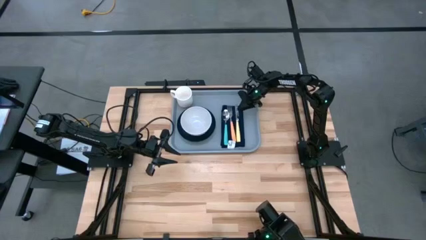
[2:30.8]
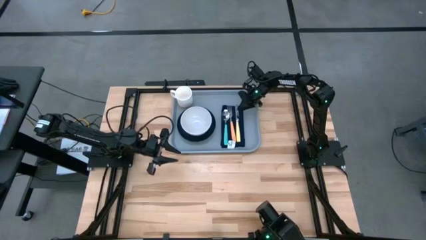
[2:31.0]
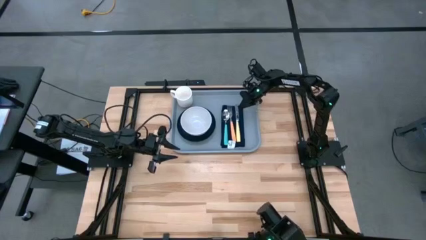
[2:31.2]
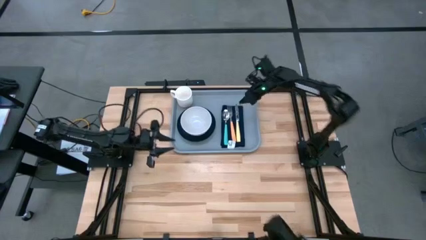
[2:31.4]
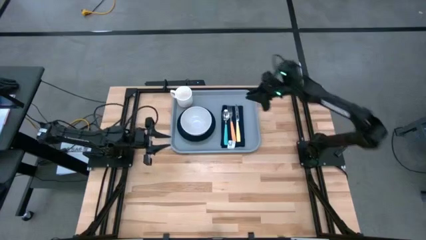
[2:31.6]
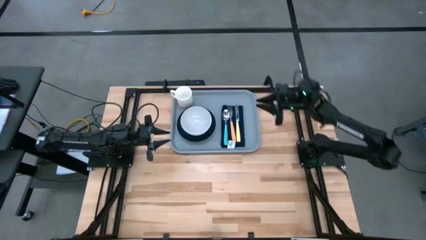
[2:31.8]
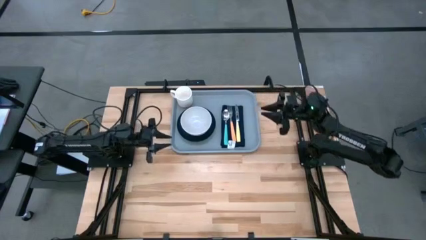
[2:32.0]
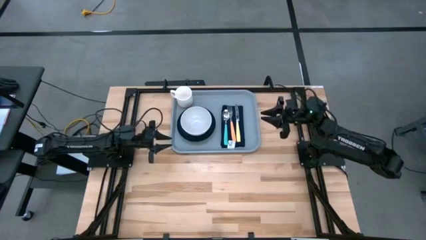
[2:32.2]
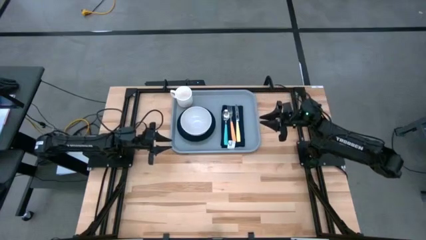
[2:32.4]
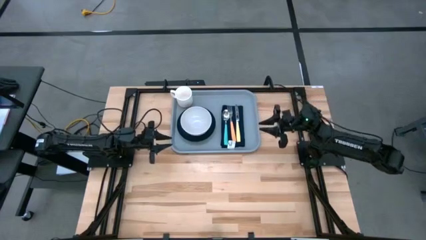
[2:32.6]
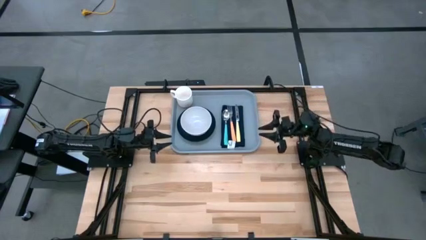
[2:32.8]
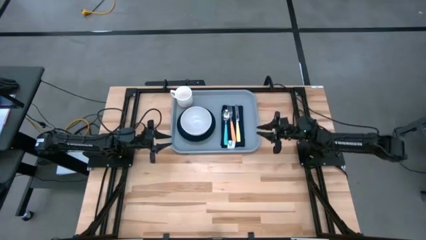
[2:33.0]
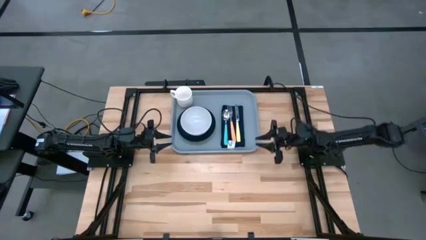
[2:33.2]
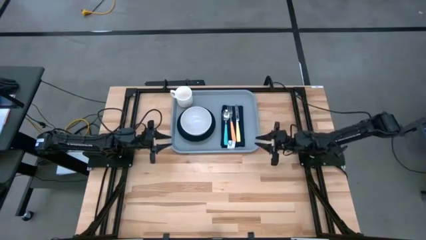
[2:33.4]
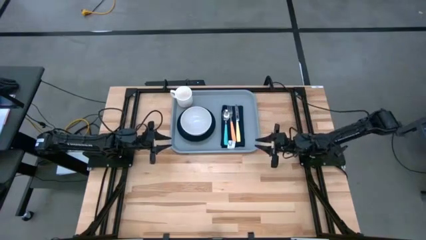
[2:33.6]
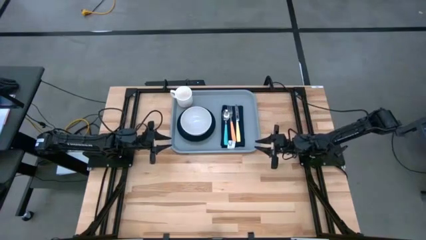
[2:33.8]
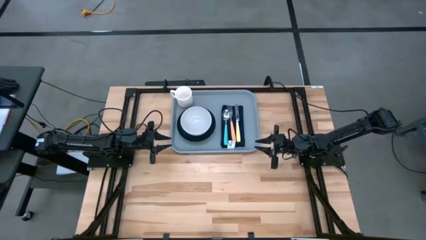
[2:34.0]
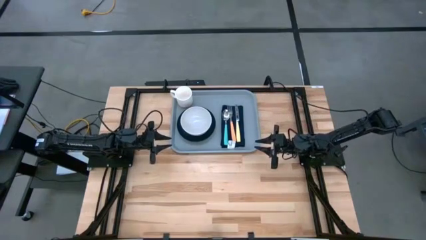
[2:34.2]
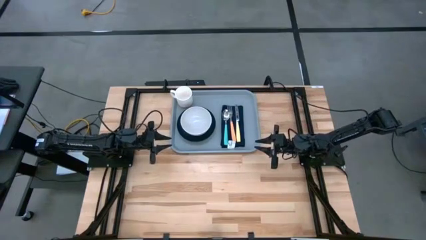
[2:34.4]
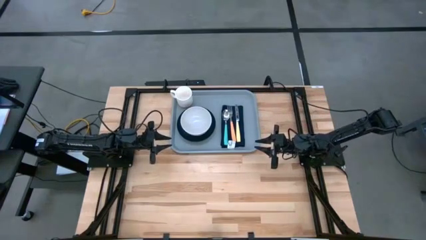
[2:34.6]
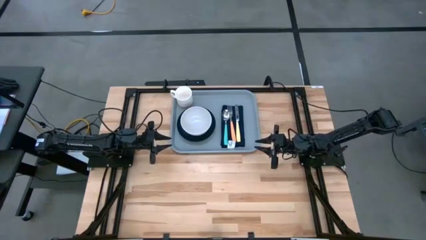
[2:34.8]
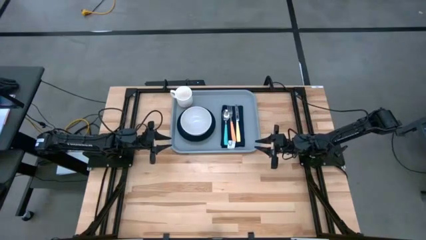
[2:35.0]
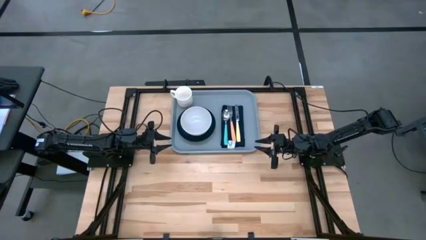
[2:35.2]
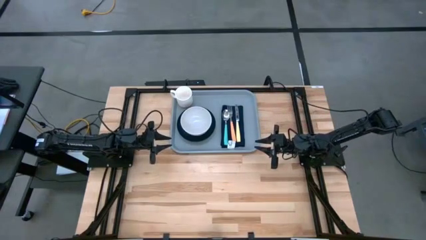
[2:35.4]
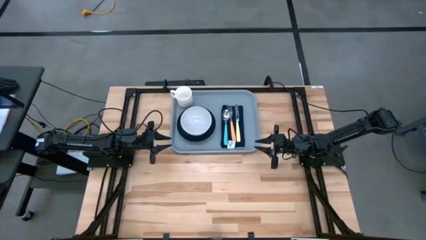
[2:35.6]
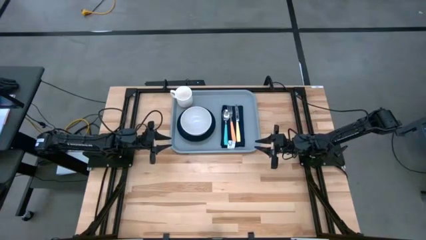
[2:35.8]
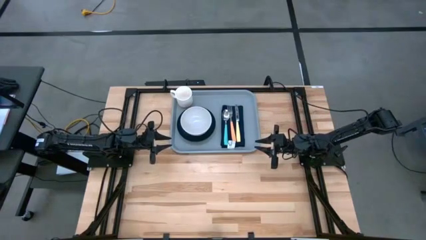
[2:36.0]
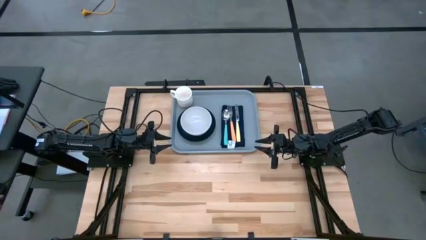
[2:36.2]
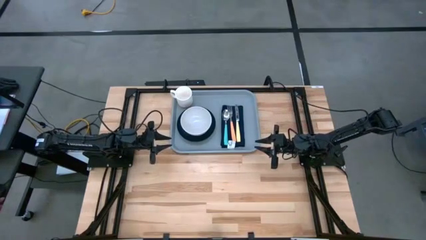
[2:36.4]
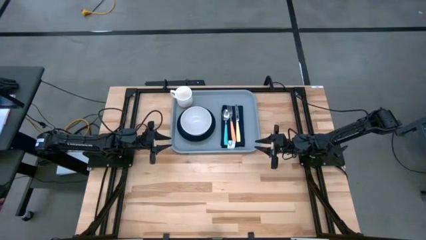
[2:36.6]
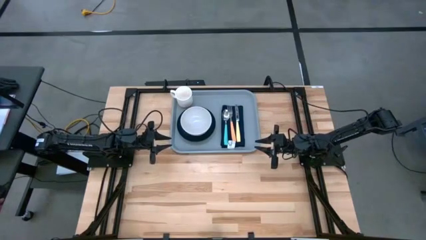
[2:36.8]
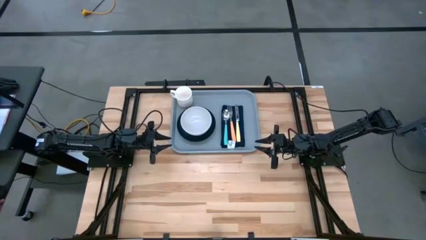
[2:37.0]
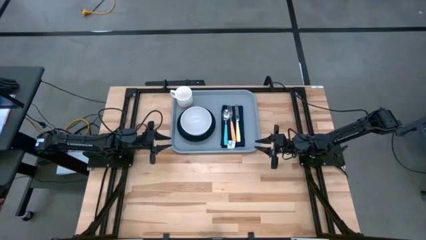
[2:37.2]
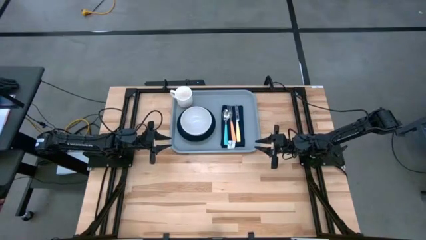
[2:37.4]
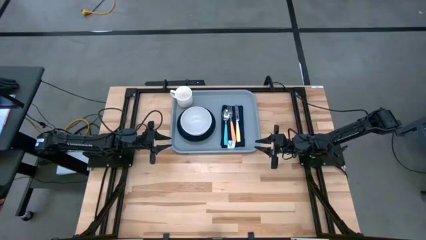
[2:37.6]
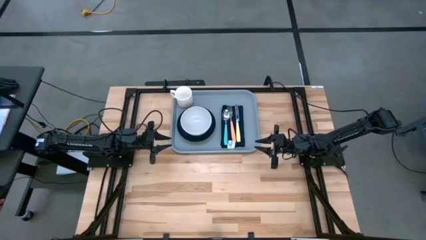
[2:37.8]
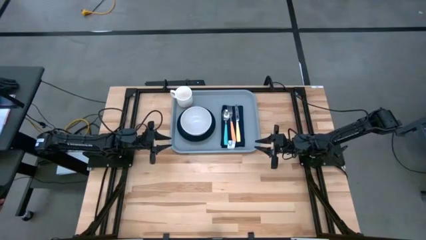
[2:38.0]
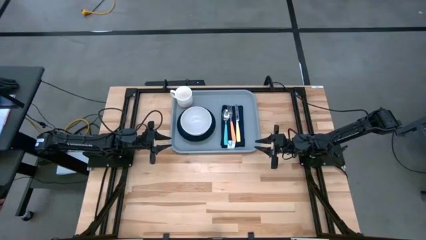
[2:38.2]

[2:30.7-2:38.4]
Task: Set up tray
Return to home position

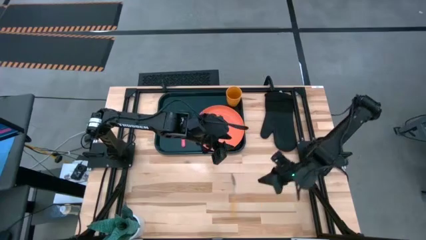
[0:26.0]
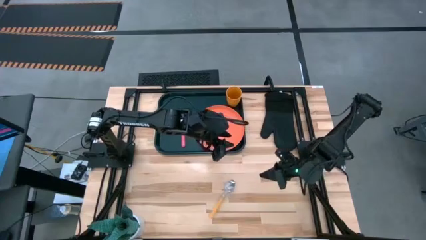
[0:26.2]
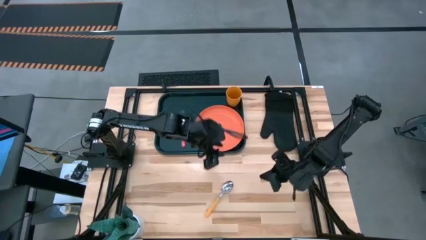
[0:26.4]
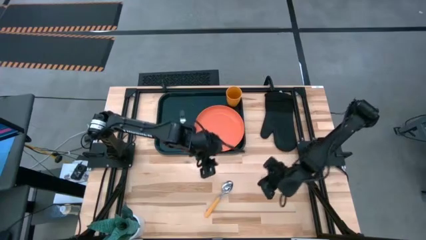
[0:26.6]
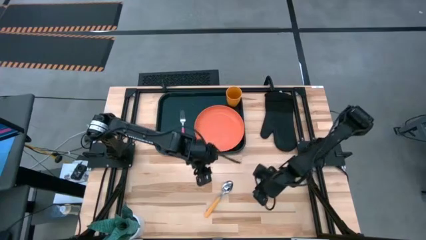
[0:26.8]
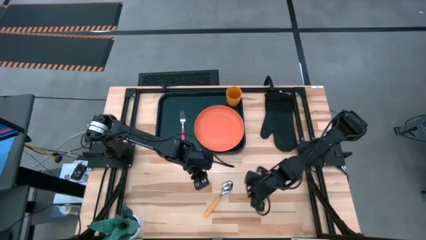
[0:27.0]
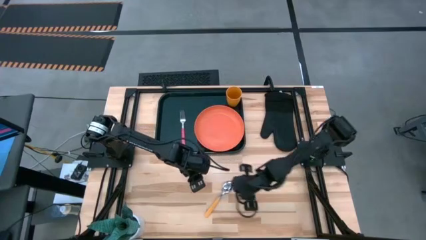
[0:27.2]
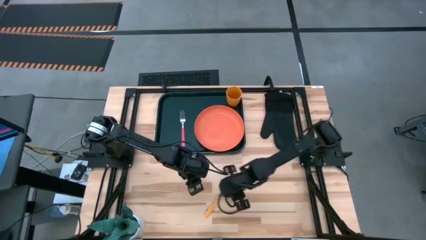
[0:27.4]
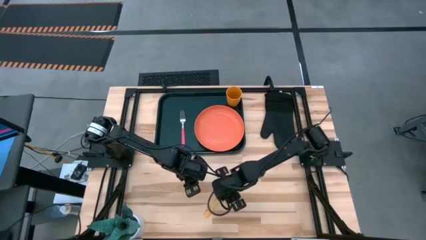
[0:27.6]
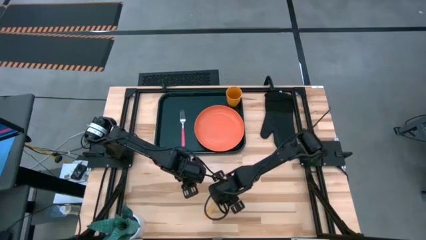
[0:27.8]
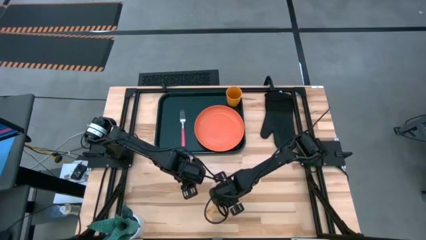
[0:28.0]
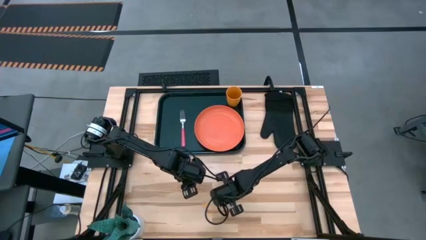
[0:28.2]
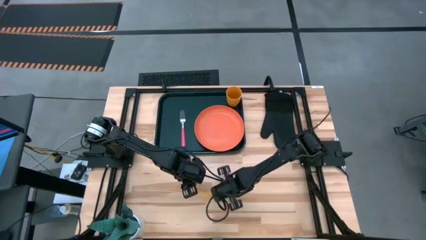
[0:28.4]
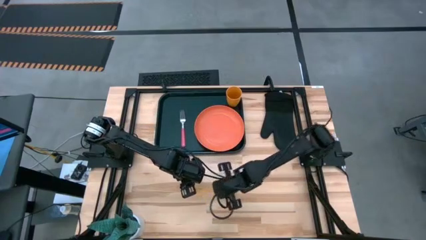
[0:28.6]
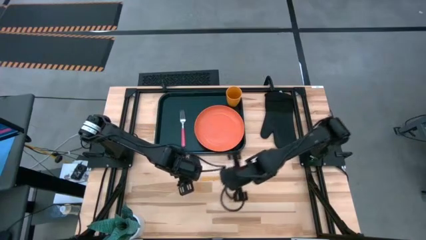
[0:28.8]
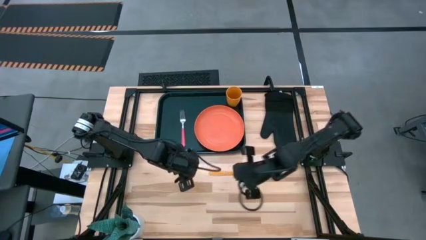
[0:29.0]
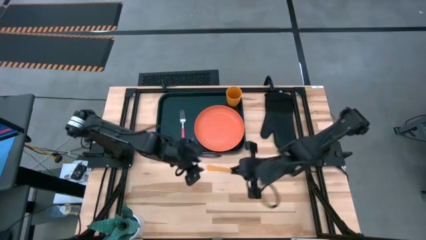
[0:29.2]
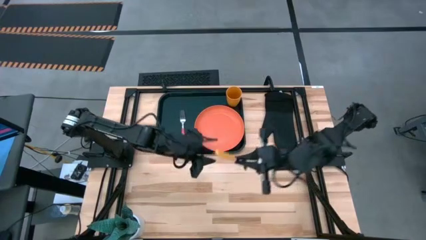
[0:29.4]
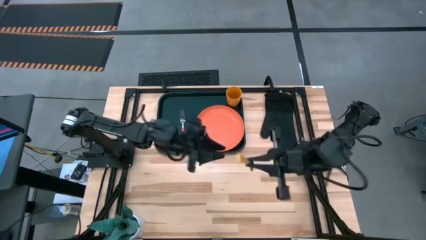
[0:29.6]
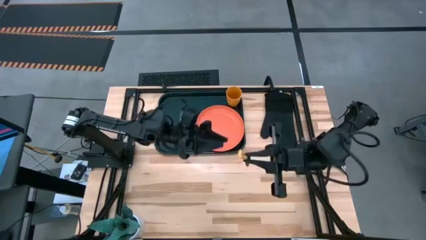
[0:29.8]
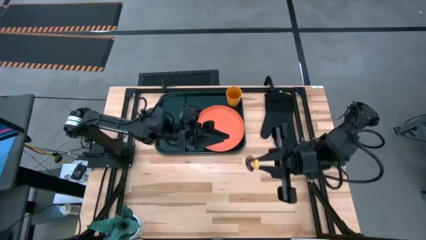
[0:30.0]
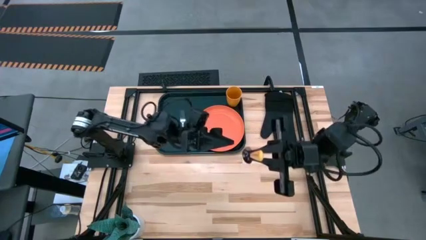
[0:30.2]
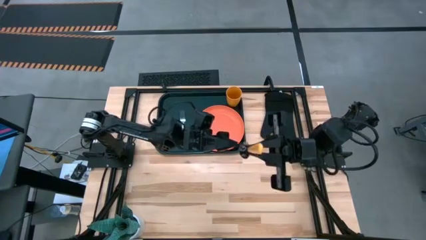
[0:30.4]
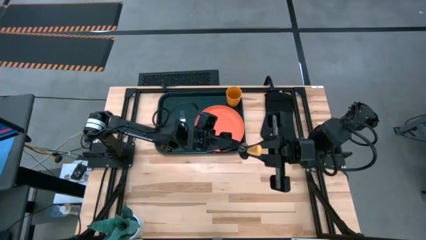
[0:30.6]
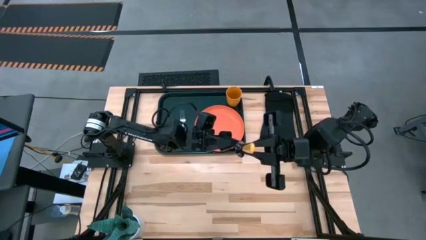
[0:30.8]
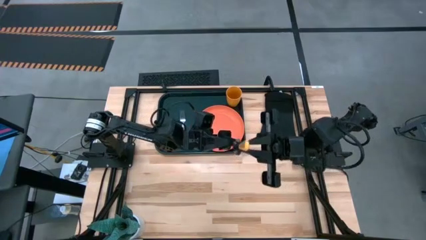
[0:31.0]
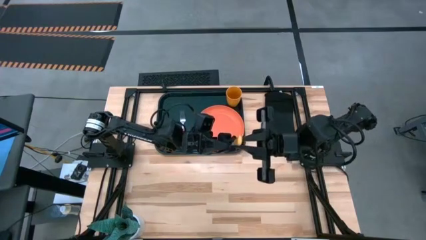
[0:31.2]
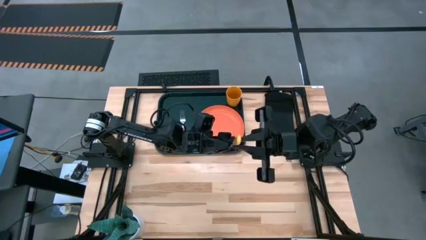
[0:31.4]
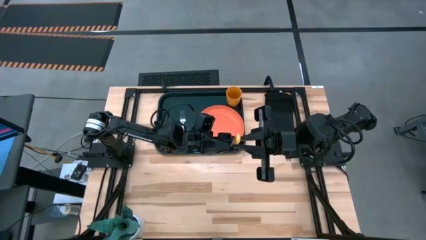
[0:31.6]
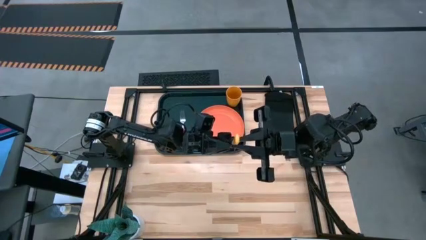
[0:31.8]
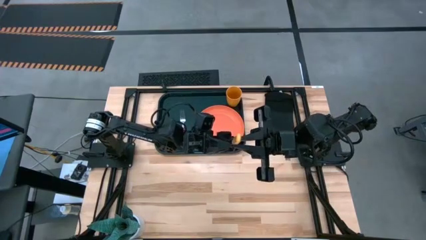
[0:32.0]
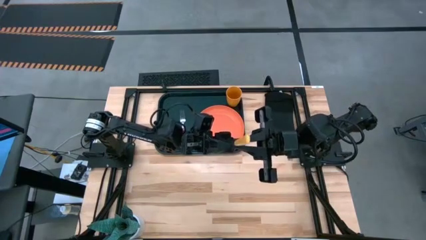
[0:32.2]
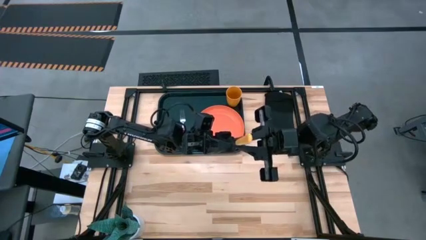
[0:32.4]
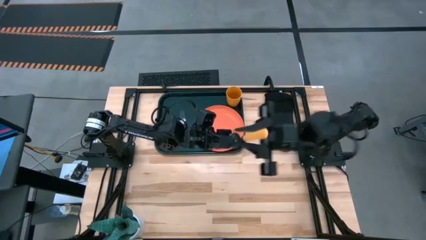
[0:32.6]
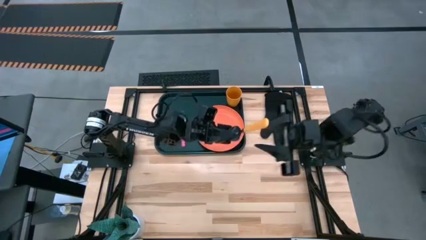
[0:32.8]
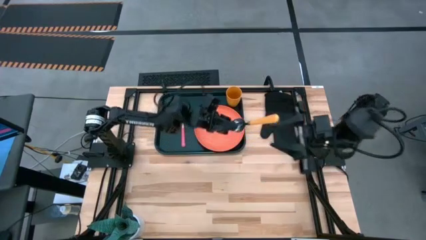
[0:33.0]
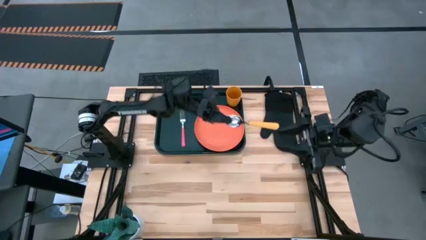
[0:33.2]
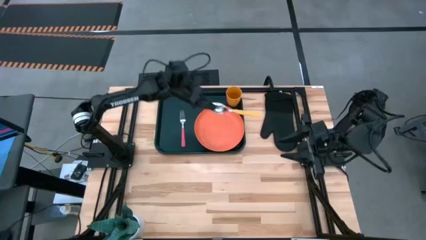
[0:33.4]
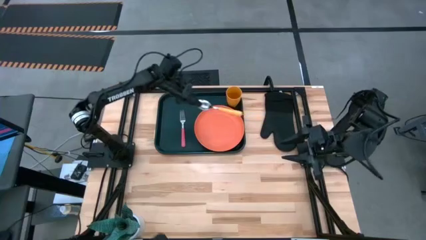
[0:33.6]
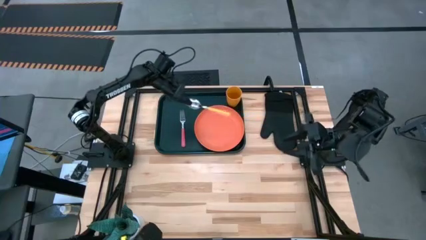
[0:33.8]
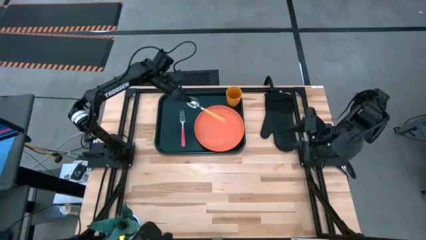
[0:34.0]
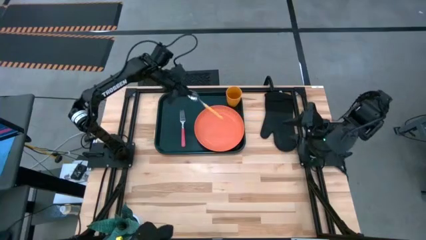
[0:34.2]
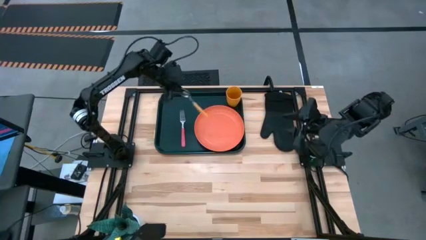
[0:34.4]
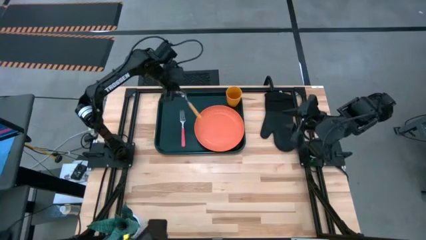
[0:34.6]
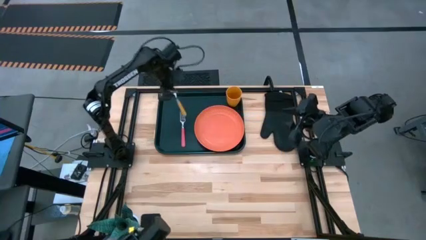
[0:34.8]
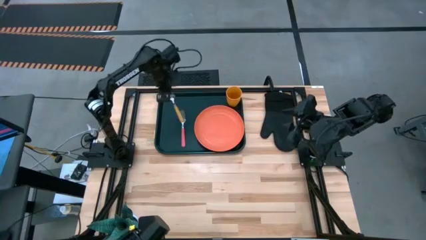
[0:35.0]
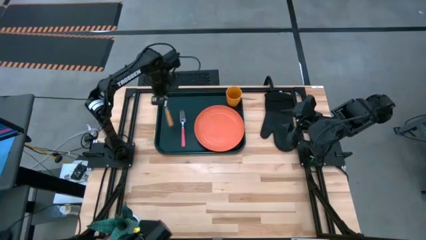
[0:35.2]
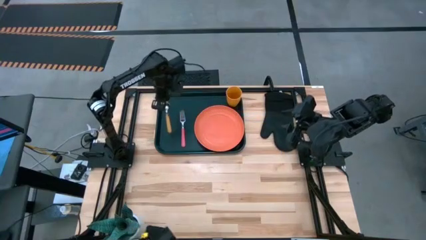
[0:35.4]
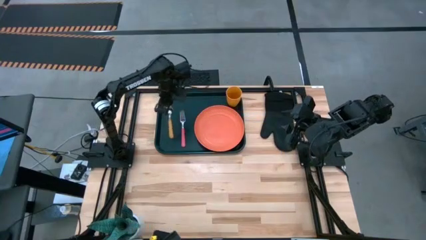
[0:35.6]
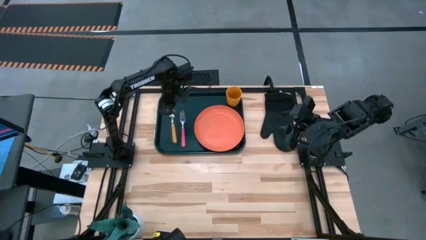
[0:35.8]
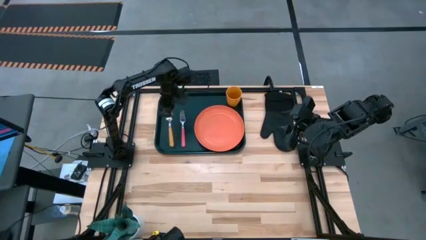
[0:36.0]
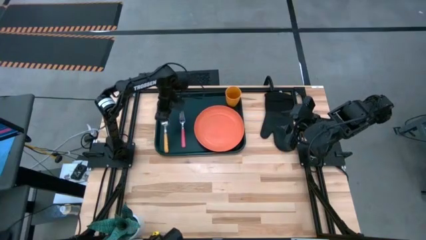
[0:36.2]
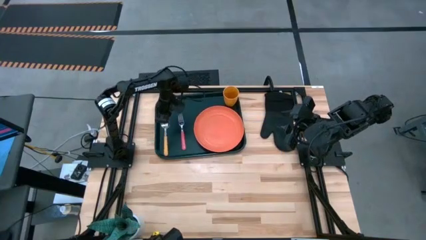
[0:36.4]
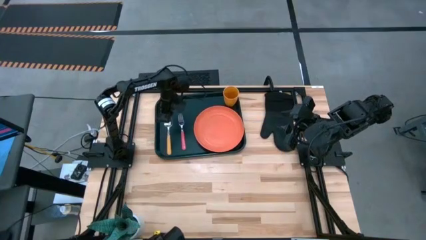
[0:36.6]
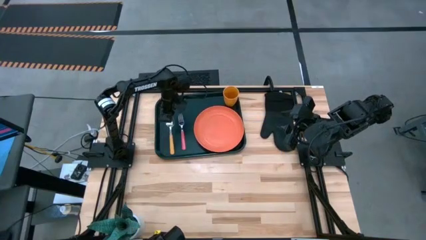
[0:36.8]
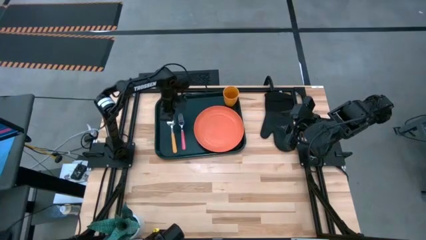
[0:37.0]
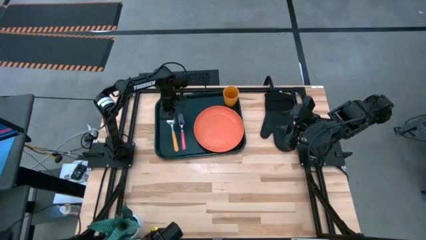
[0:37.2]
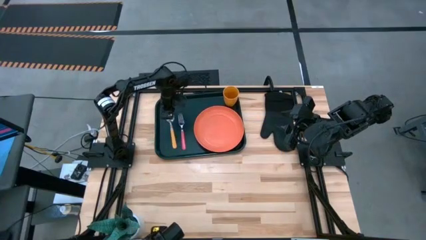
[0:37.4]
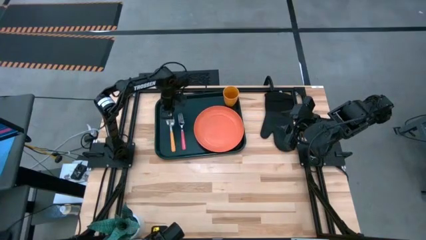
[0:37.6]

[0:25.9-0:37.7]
Task: Pick and place plate/cup/fork/spoon on tray
Put the yellow spoon on the black tray to the left of the pink fork
